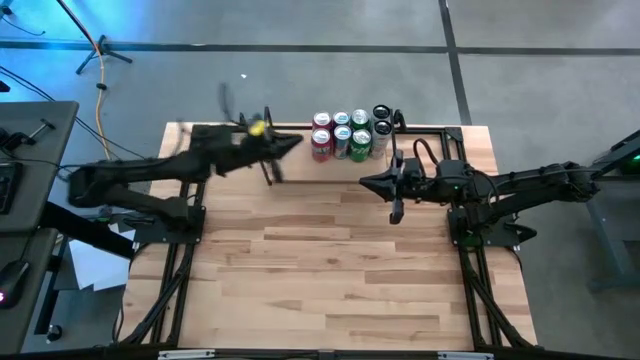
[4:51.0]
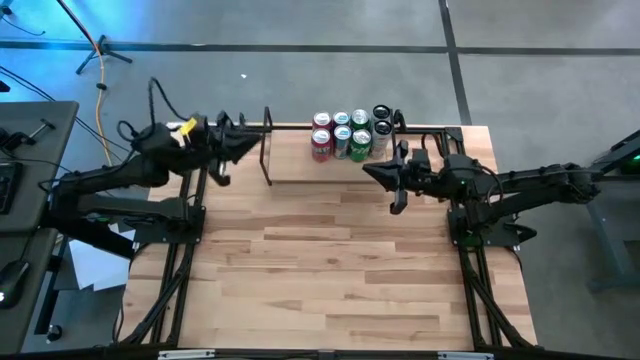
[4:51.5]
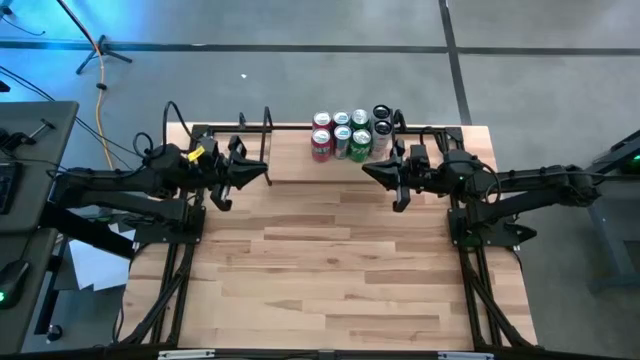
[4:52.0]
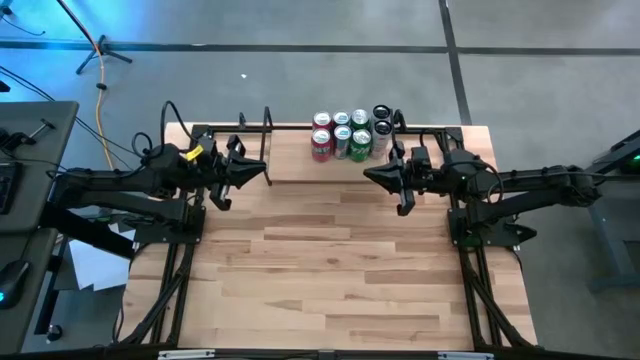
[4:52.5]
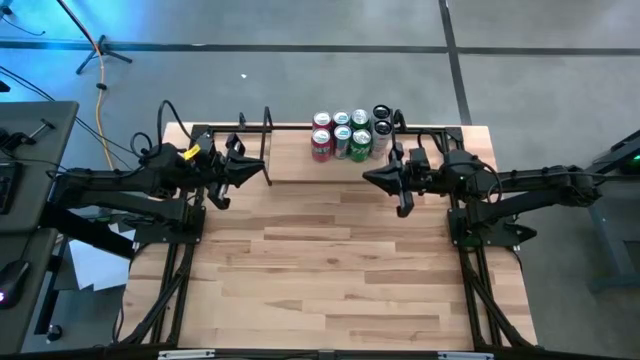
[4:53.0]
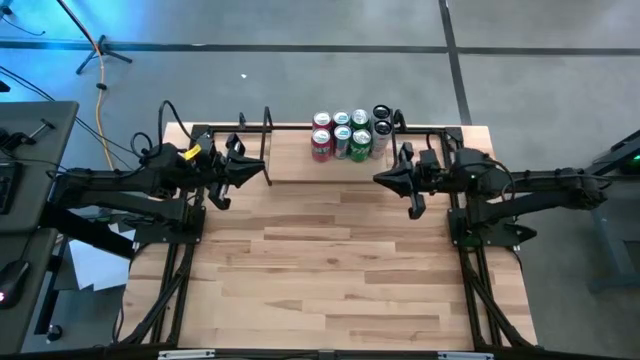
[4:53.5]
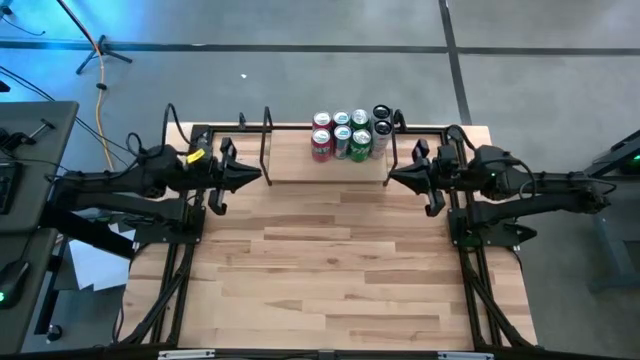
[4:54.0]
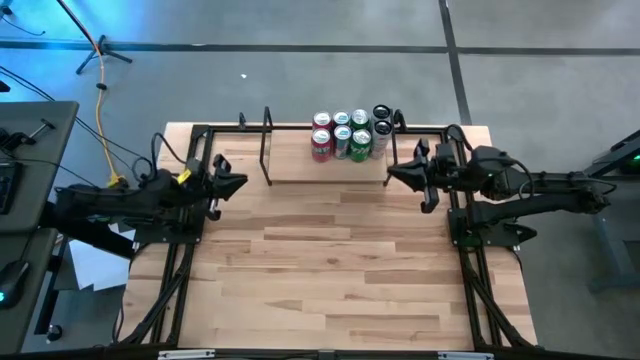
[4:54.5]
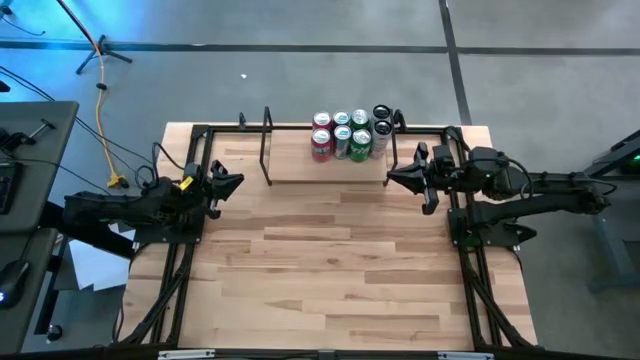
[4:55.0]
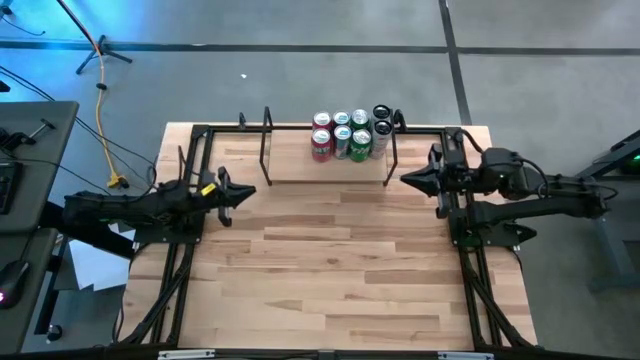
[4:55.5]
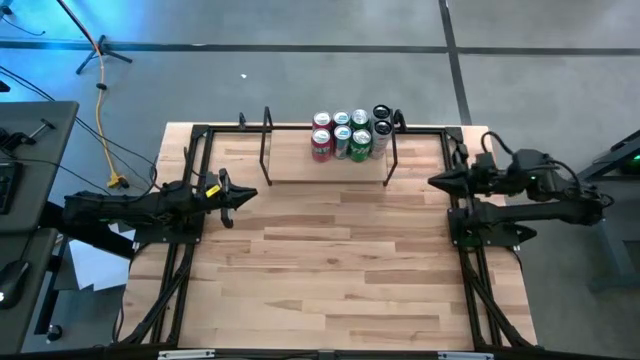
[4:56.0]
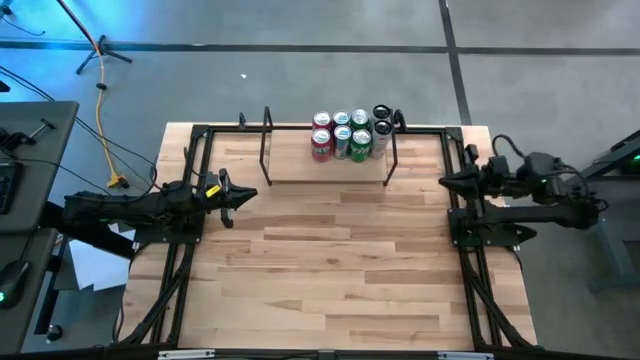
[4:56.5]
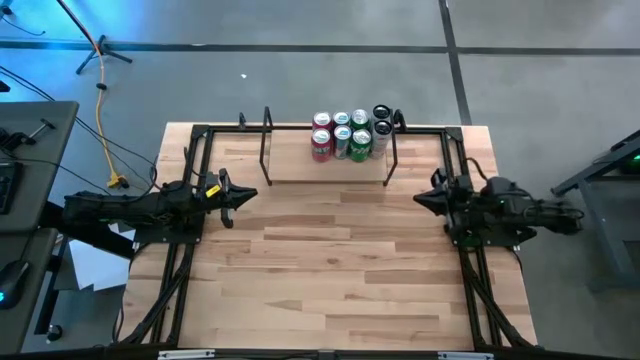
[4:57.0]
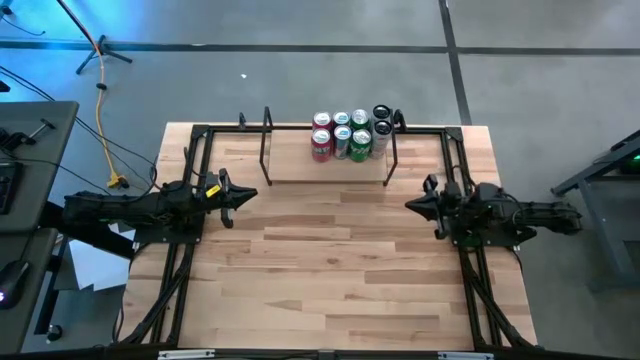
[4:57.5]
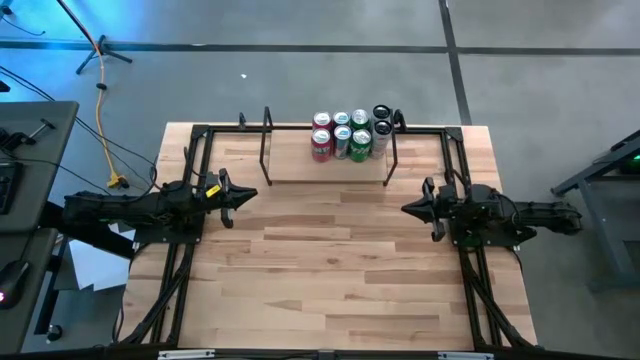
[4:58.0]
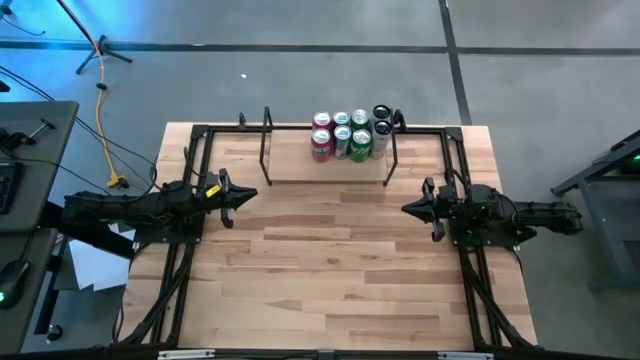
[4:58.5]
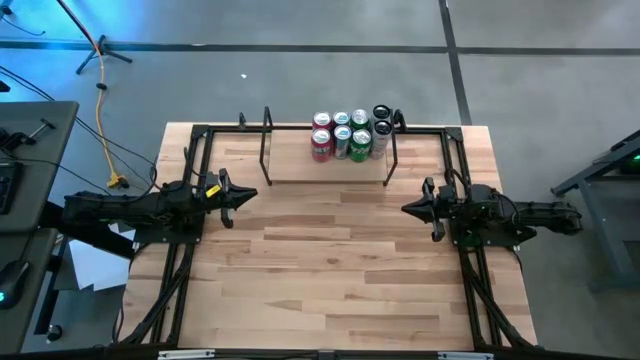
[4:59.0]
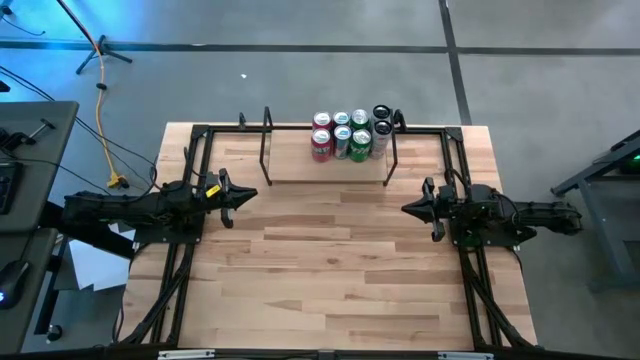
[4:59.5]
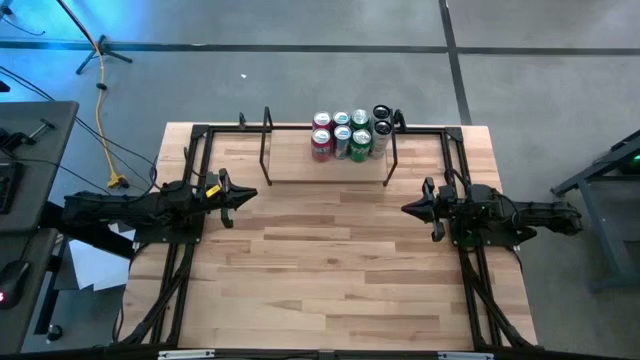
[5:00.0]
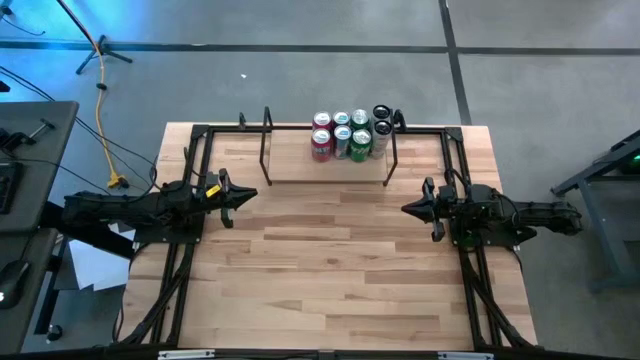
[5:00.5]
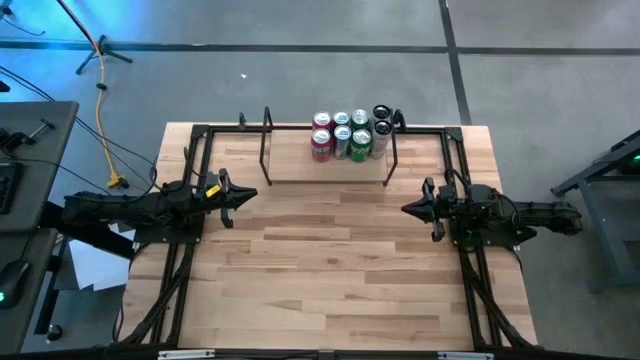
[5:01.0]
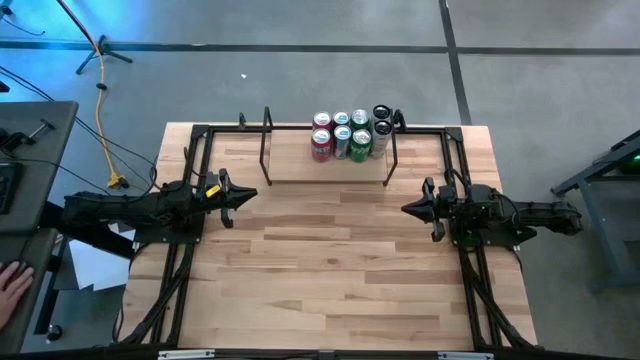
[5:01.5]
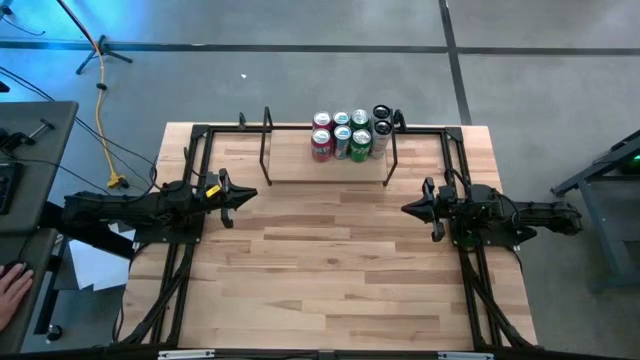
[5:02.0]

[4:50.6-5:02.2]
Task: Place canned beverage on shelf
Return to Home Position

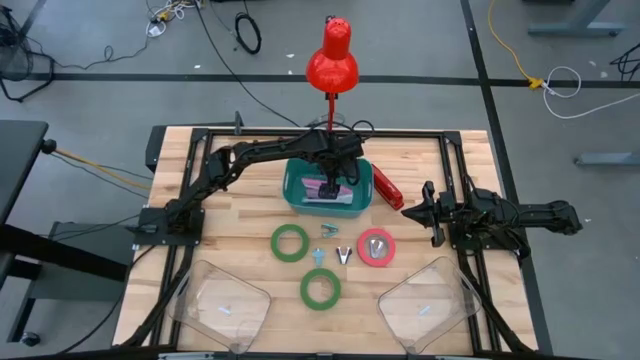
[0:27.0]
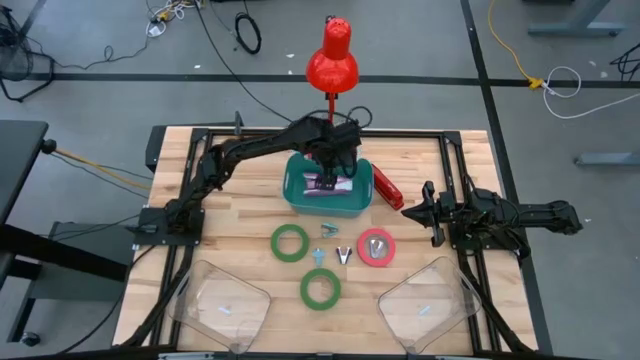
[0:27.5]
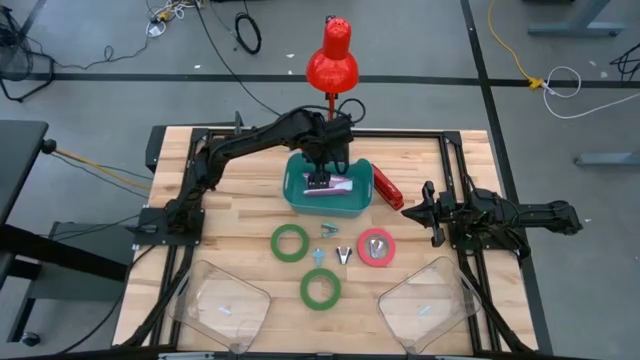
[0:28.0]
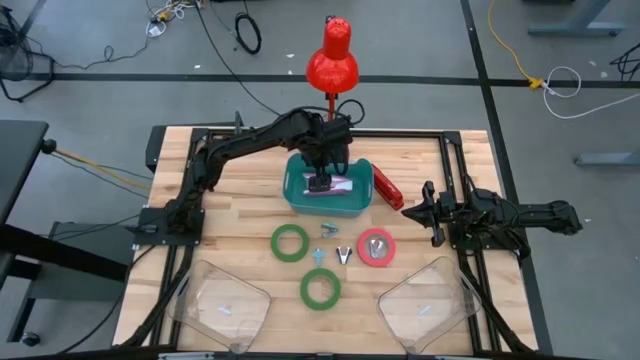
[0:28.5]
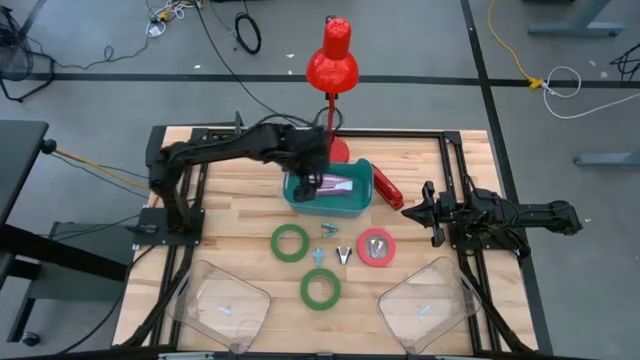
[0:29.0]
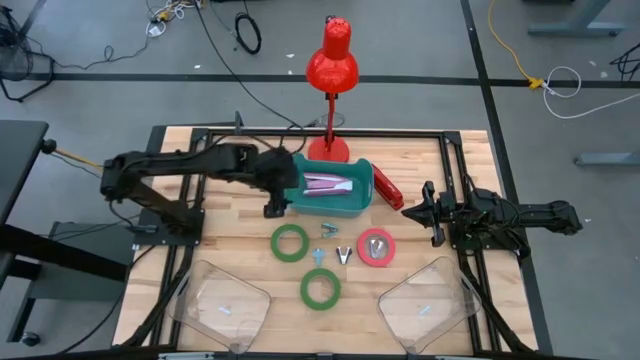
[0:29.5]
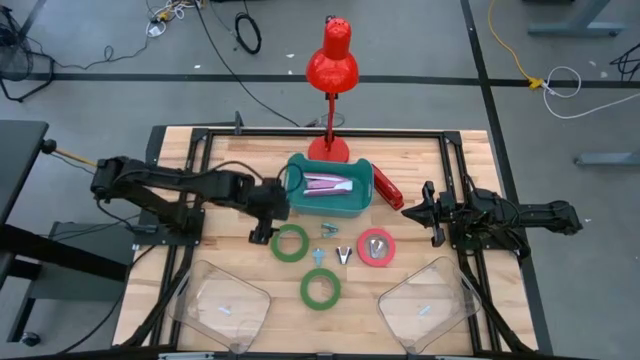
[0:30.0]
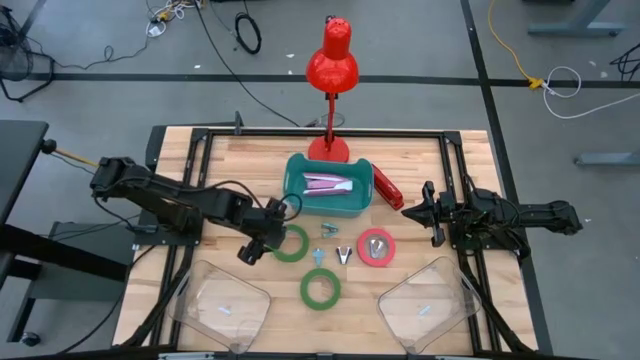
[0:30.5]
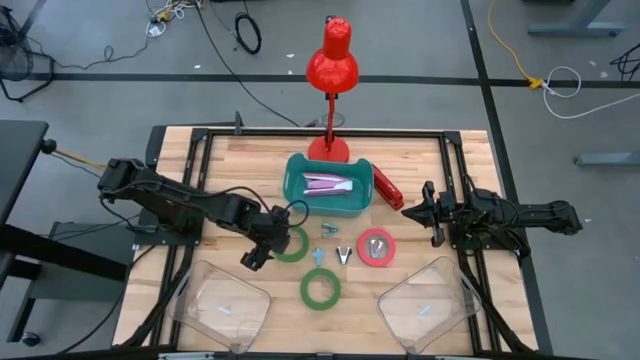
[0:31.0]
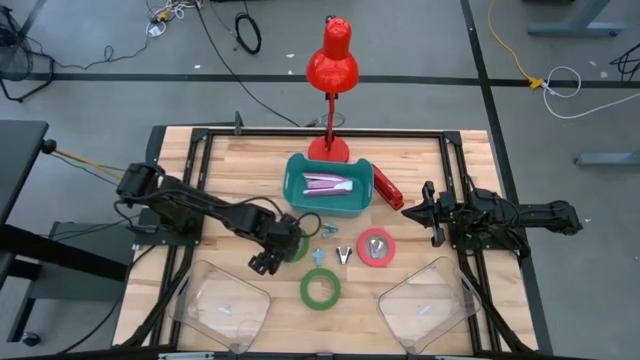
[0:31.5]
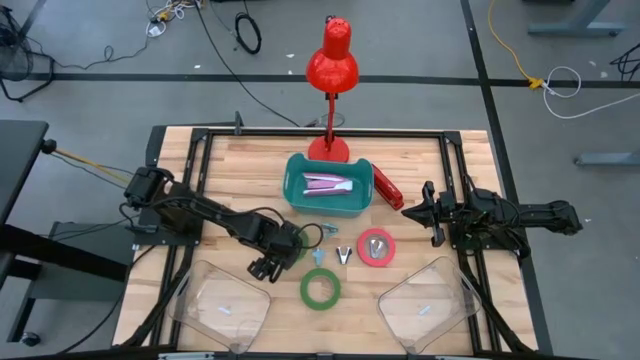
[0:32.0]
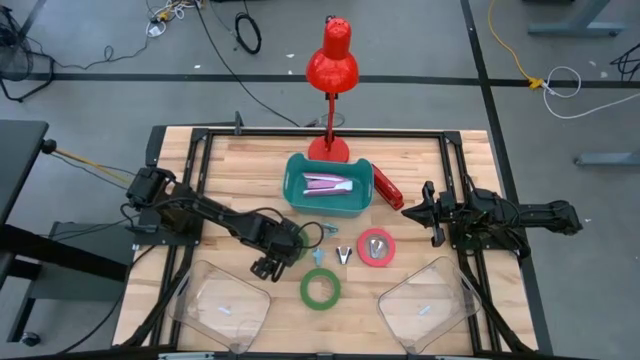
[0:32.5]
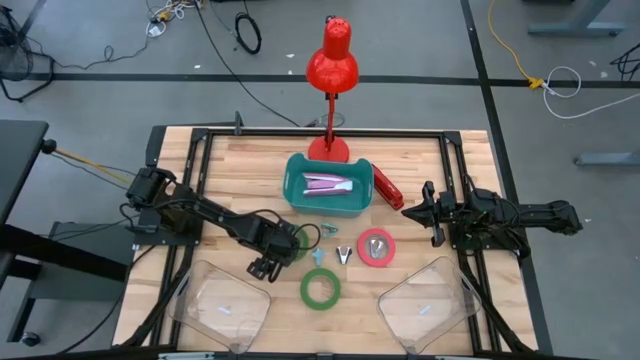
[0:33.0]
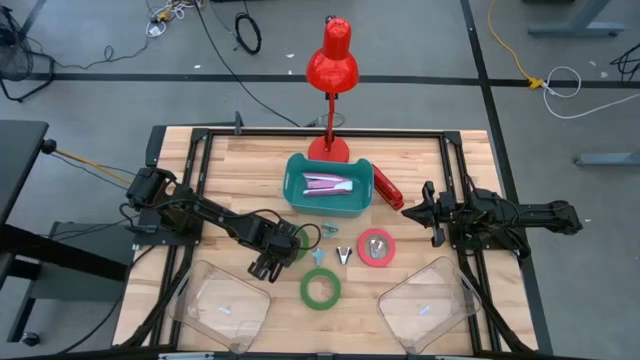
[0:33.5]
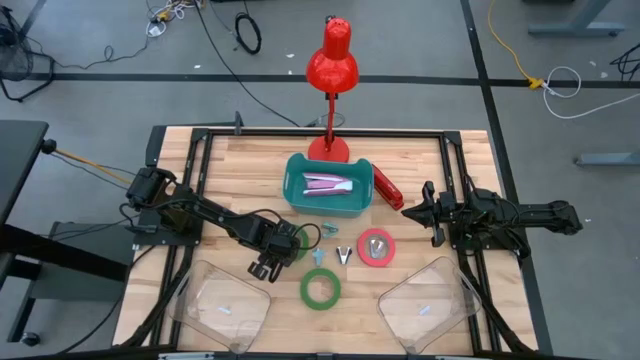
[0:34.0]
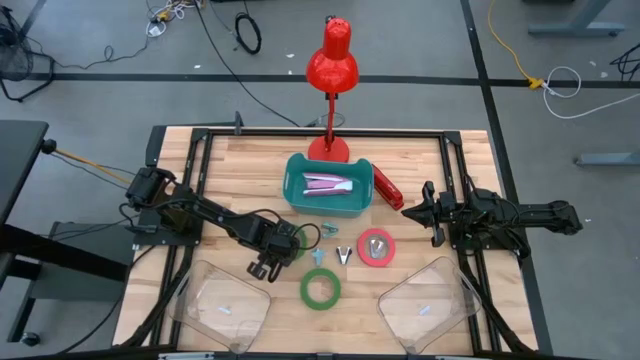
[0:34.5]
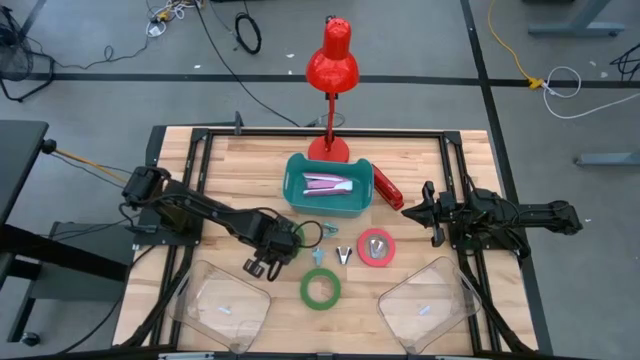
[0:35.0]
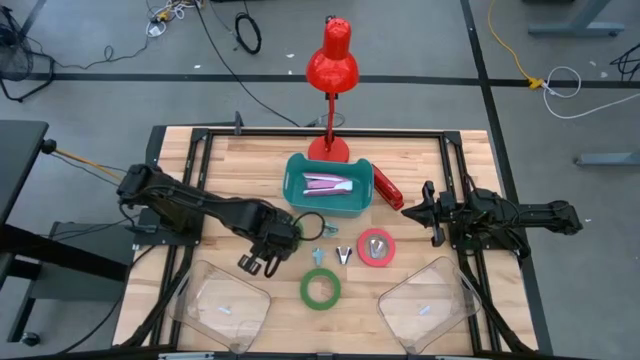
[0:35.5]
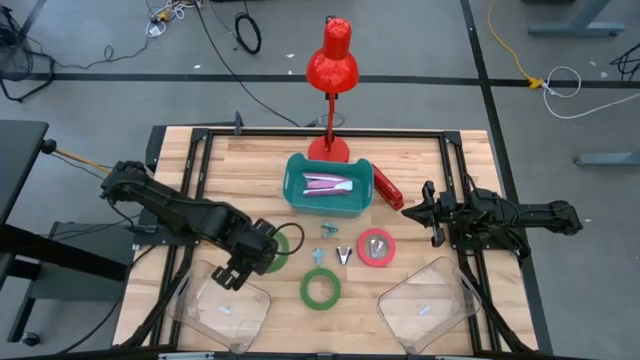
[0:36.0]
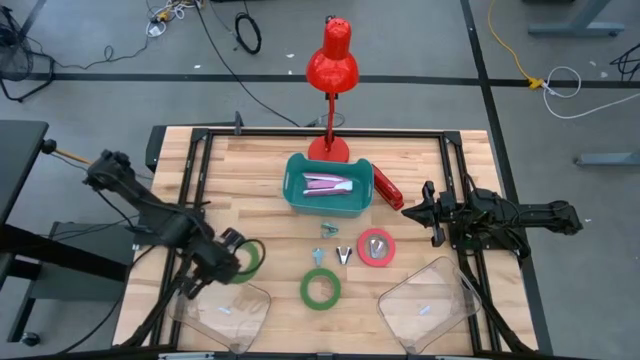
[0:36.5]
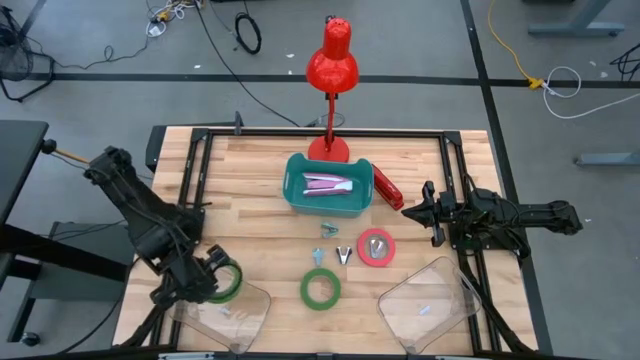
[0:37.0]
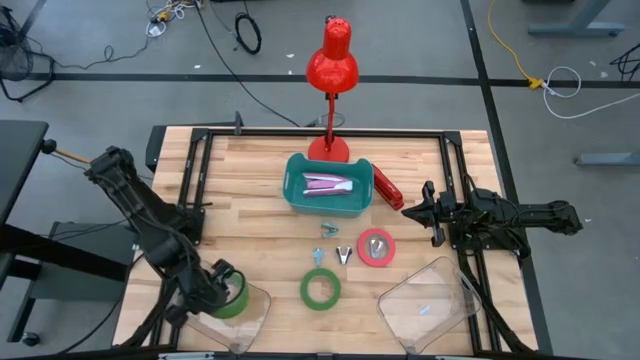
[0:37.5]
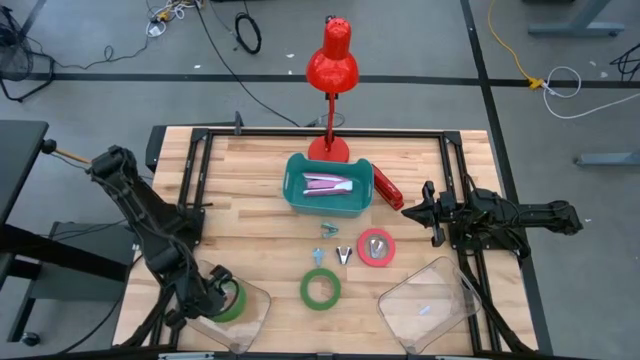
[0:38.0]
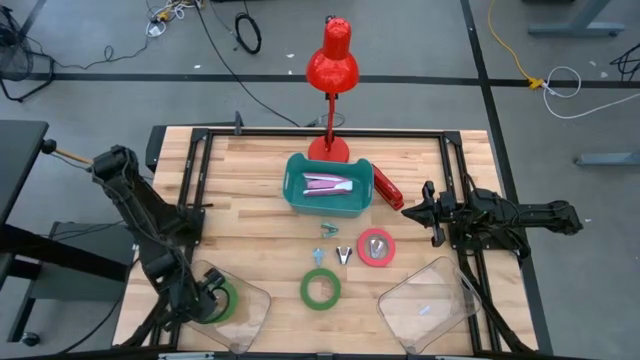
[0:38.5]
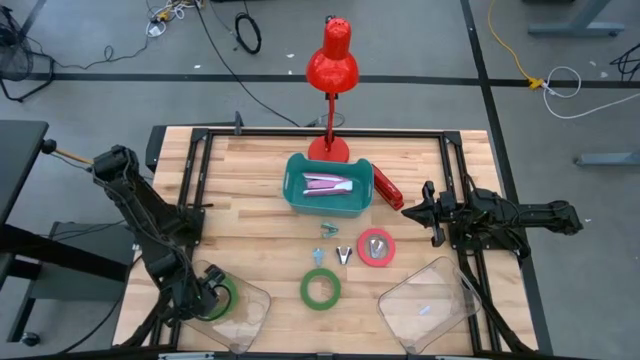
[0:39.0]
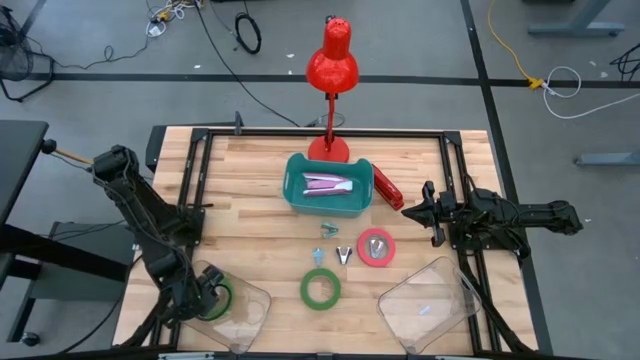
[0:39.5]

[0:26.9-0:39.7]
Task: Pick and place Stapler, Stapler remover, tape
Put the top green tape in the left transparent bin
